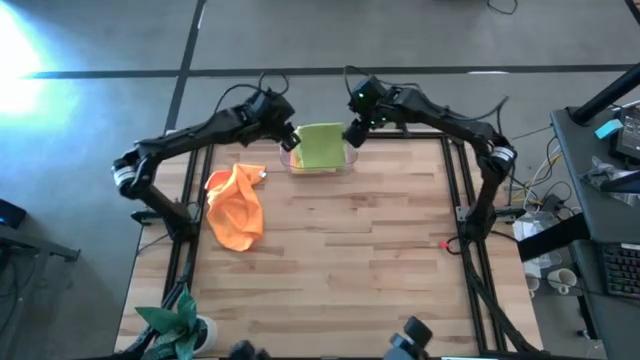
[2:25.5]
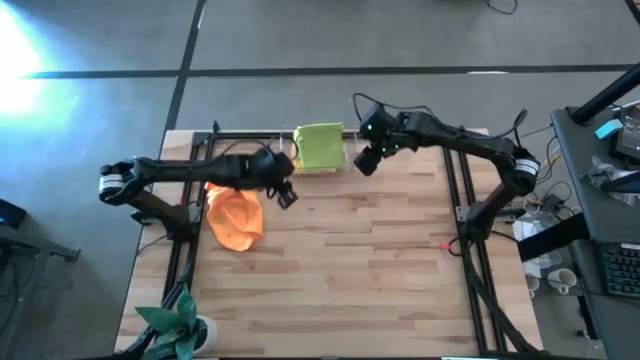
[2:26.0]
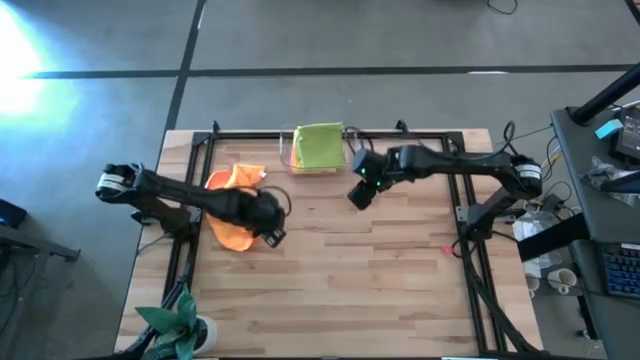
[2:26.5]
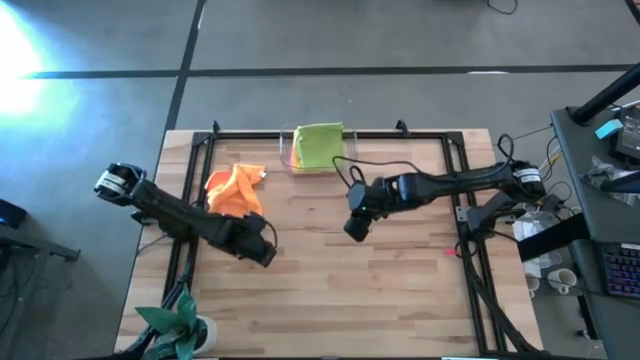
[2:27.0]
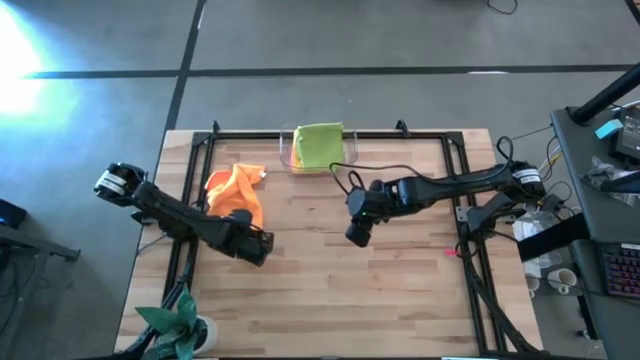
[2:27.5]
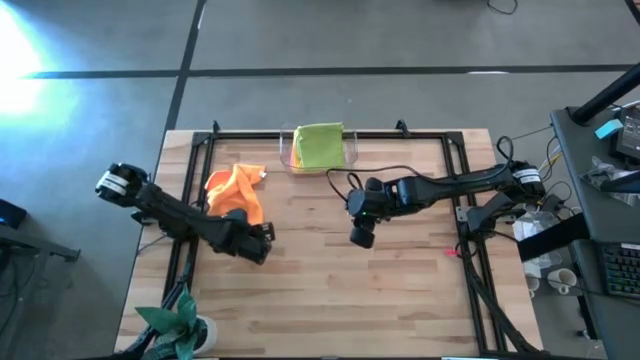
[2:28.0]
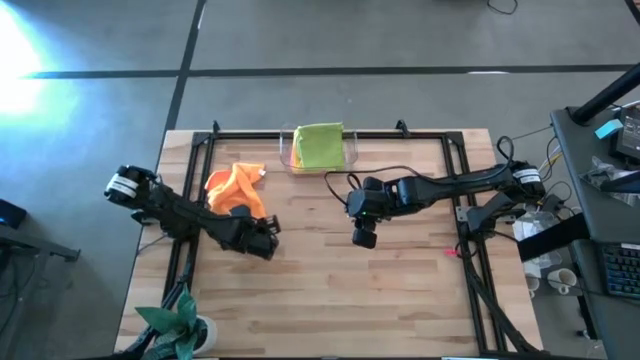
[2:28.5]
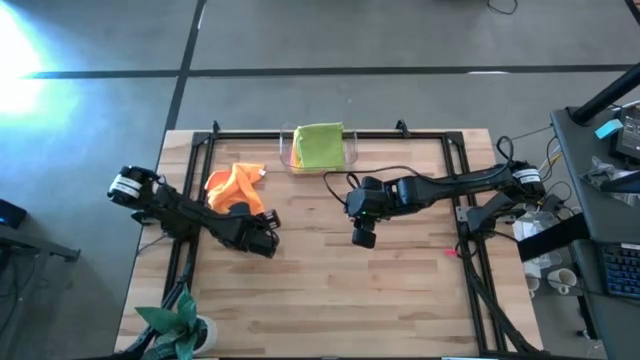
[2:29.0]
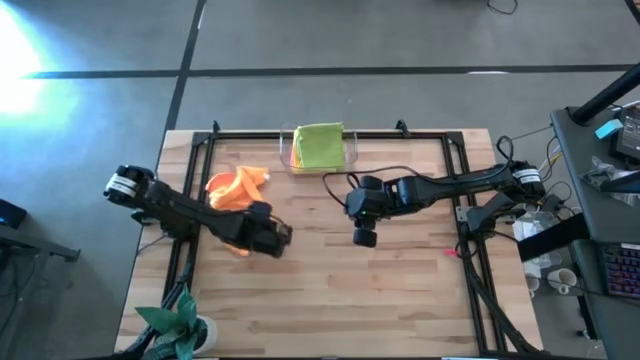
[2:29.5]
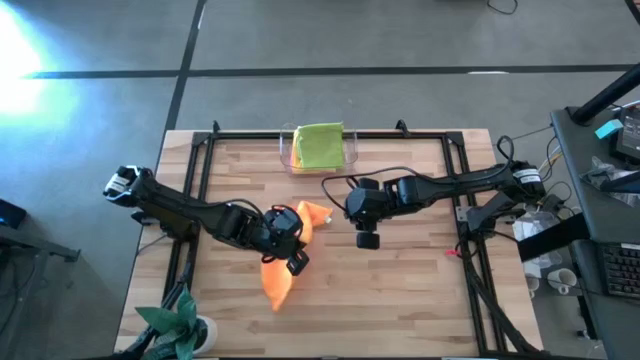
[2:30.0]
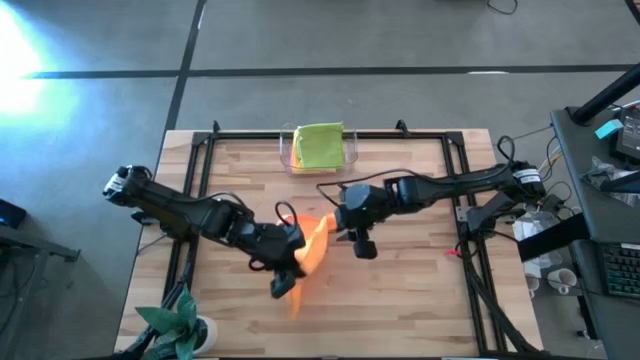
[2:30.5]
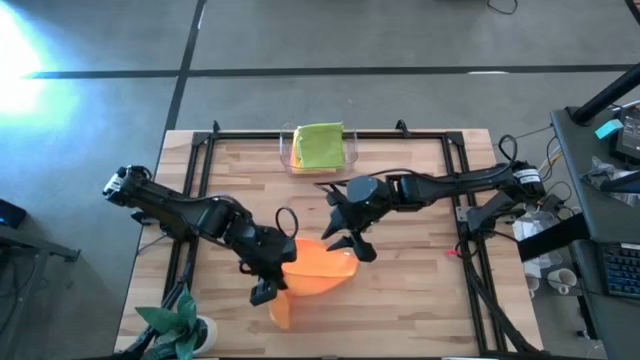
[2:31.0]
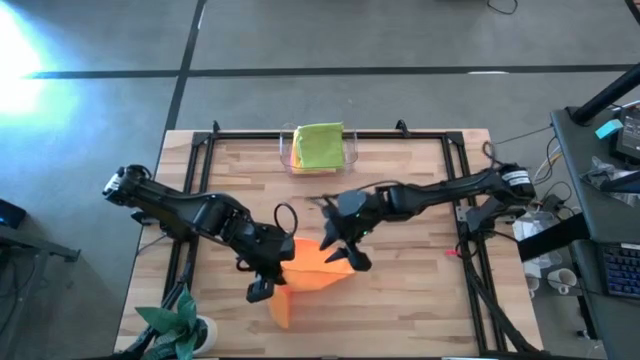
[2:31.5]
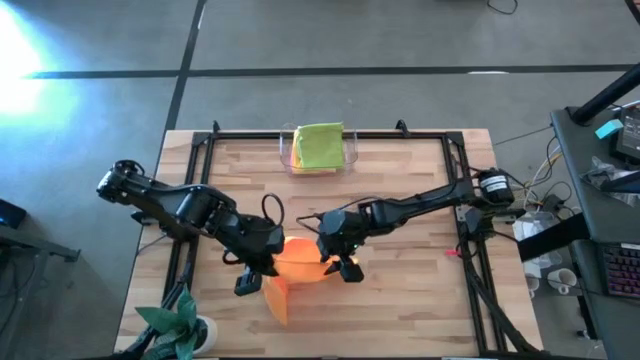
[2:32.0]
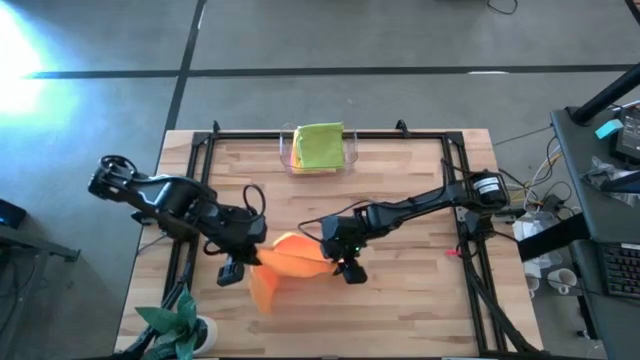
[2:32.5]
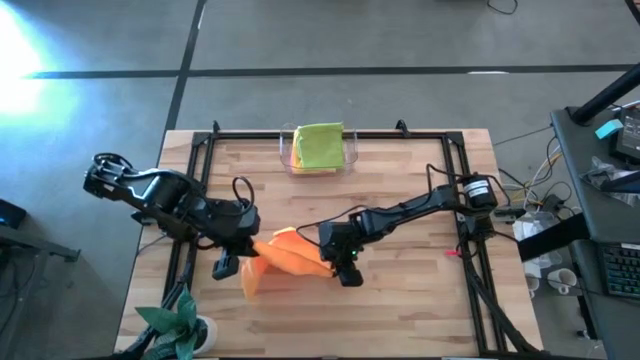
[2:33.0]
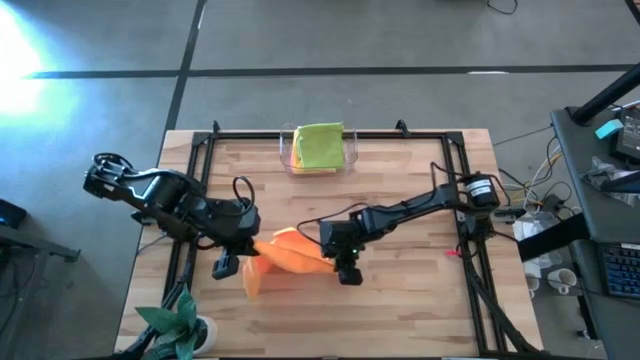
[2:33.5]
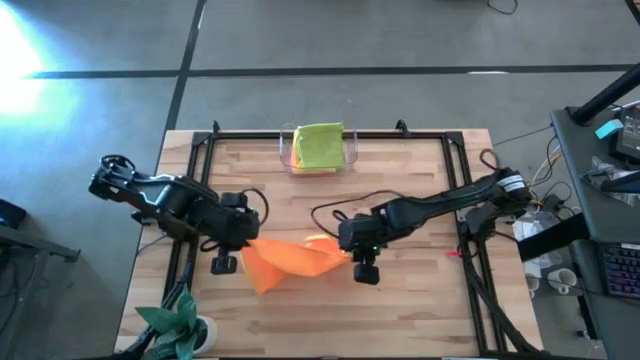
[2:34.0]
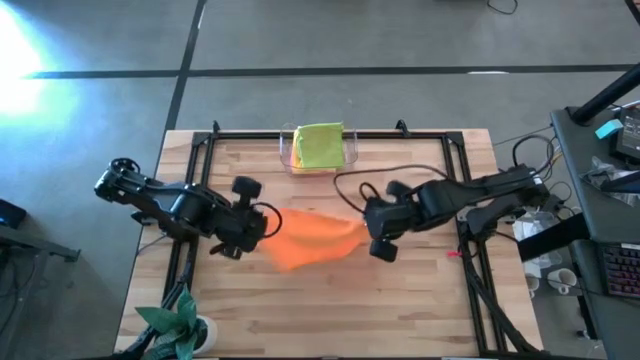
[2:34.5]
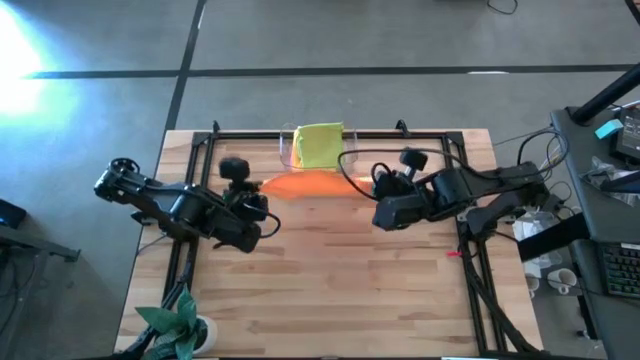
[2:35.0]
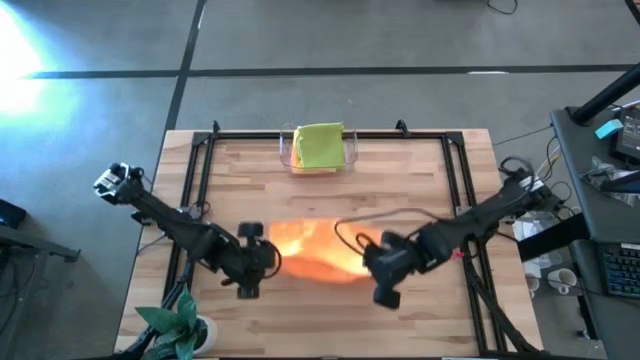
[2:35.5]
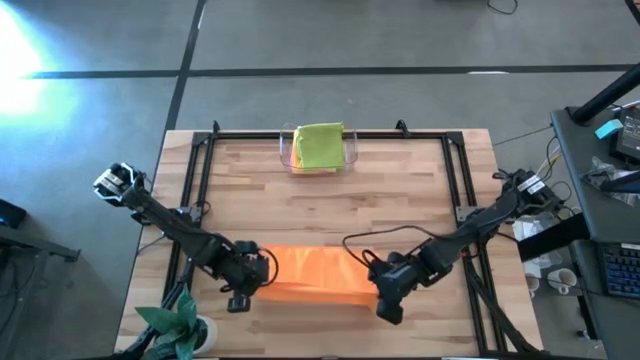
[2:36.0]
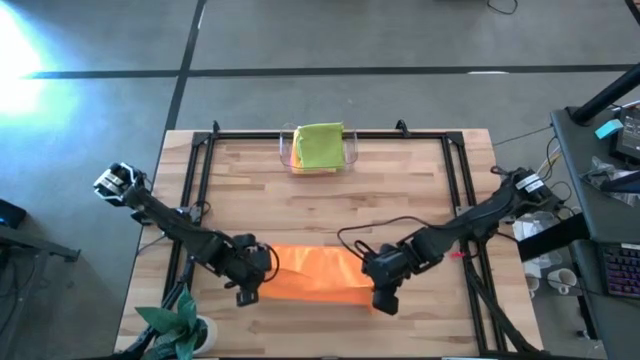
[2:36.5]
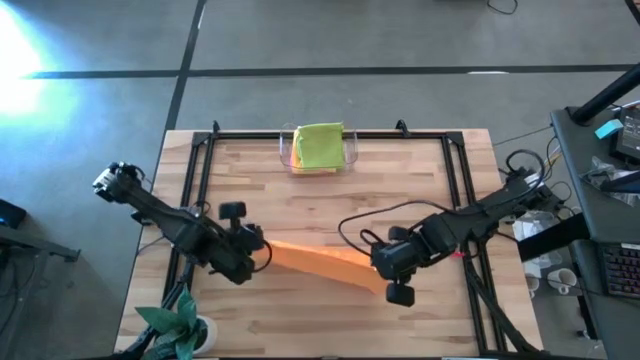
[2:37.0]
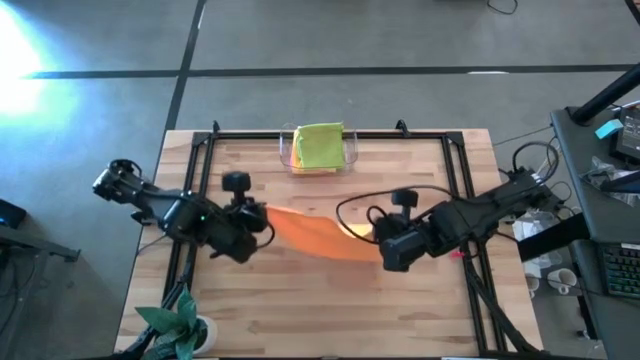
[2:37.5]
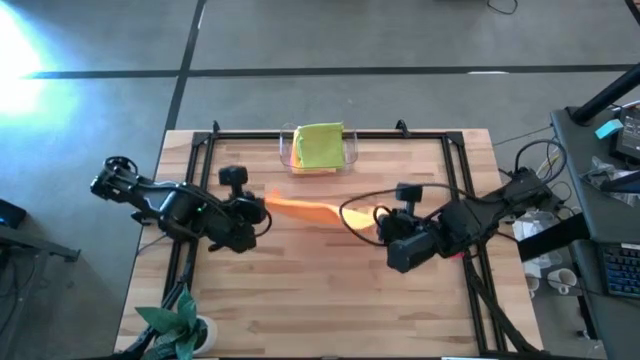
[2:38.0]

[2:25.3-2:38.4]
Task: Fold microfiber towels
Fold the orange microfiber cloth

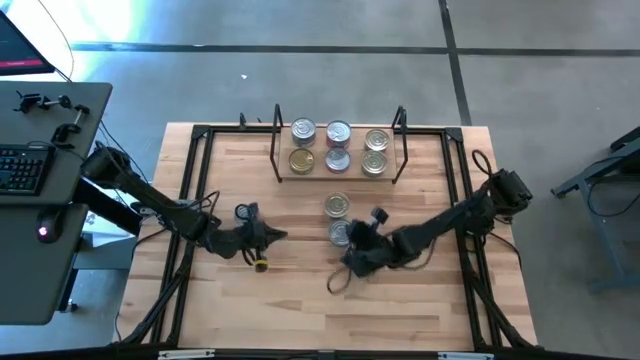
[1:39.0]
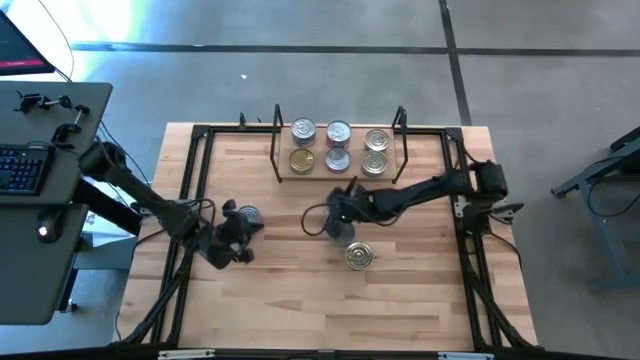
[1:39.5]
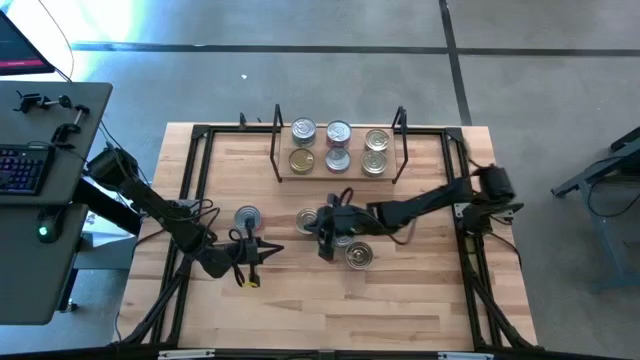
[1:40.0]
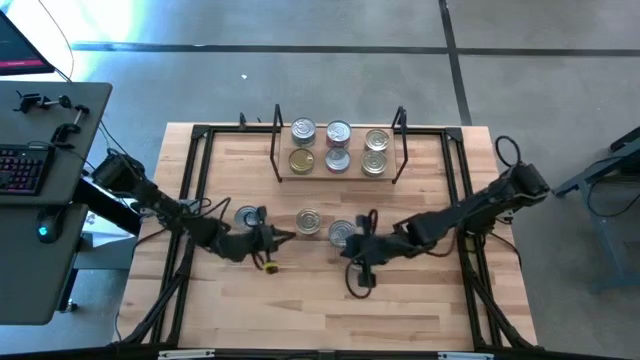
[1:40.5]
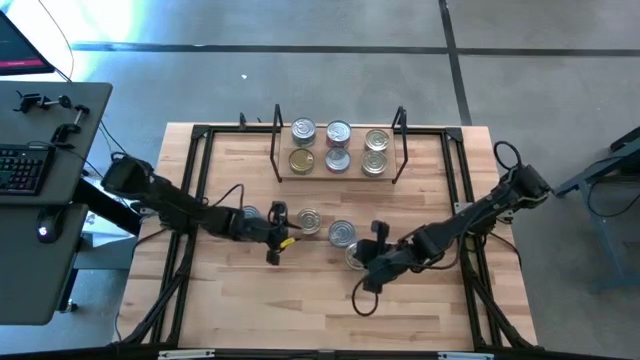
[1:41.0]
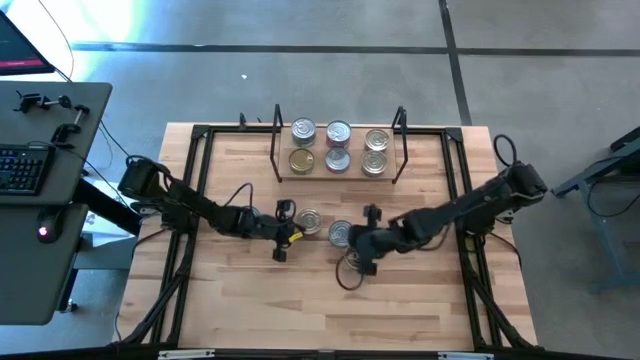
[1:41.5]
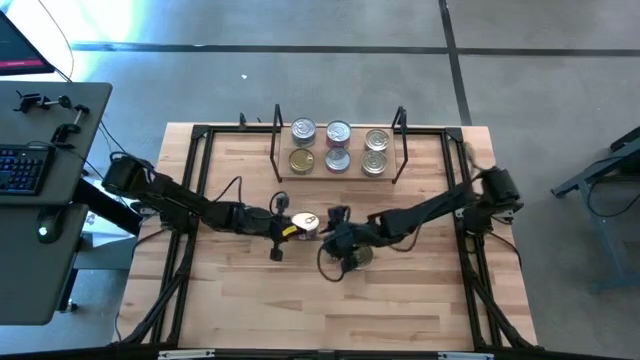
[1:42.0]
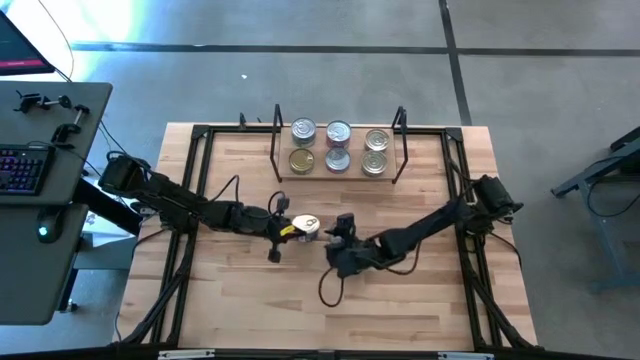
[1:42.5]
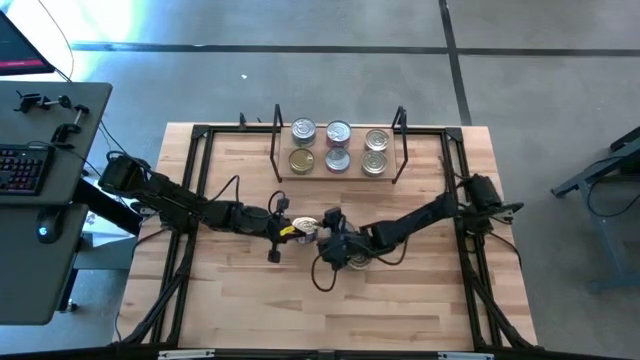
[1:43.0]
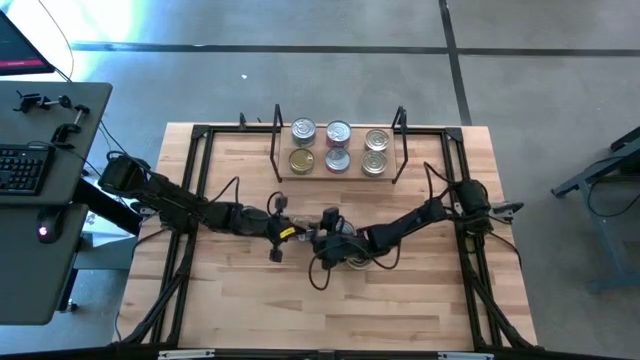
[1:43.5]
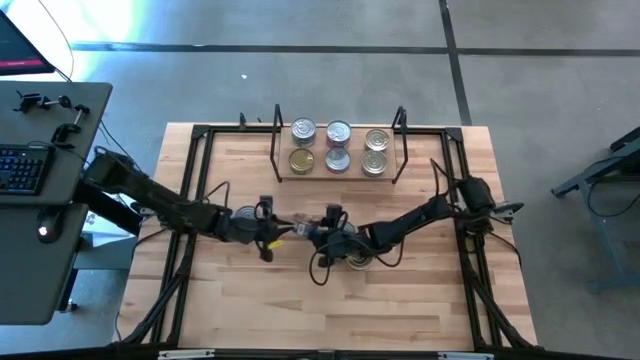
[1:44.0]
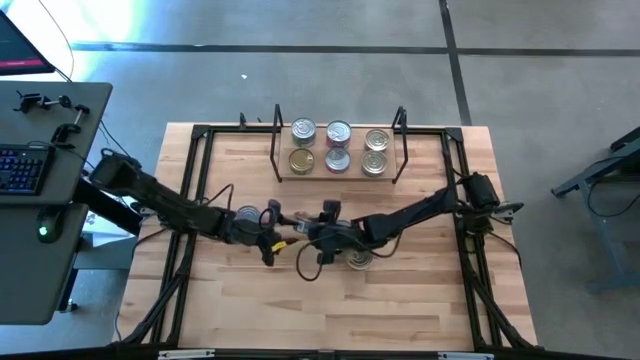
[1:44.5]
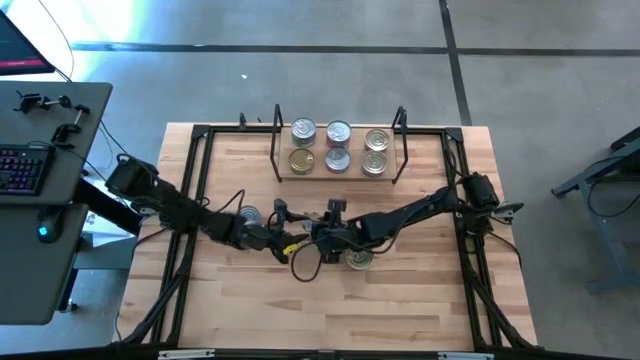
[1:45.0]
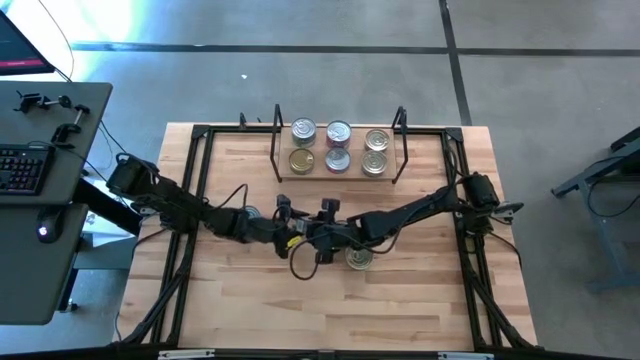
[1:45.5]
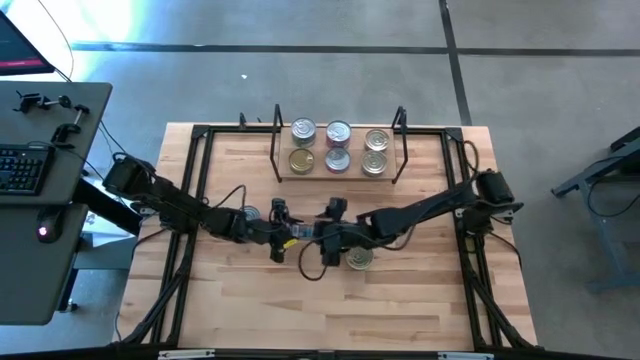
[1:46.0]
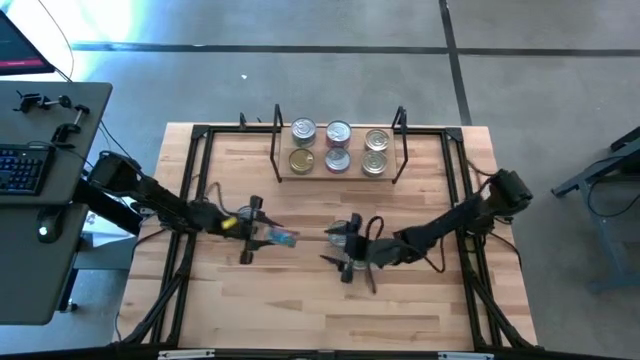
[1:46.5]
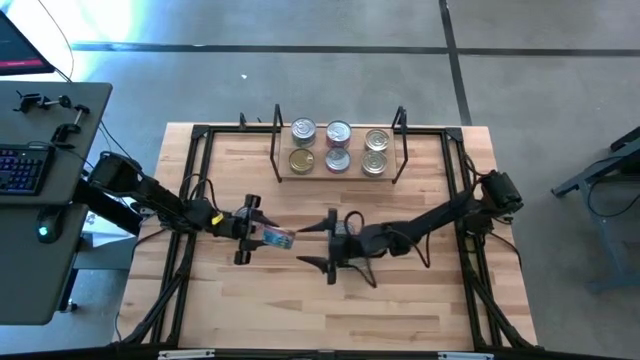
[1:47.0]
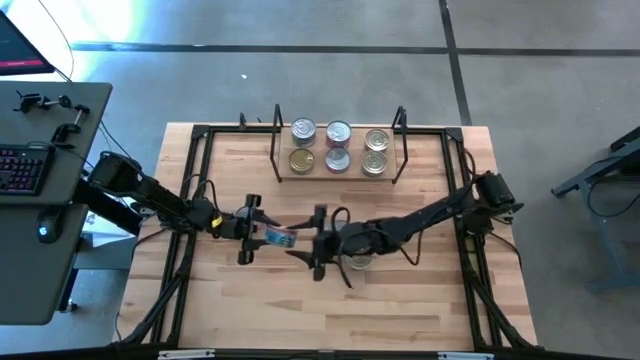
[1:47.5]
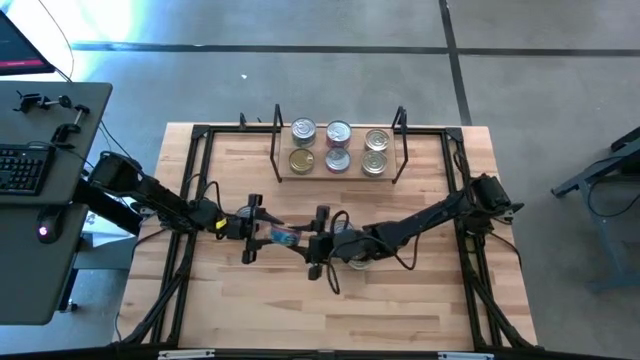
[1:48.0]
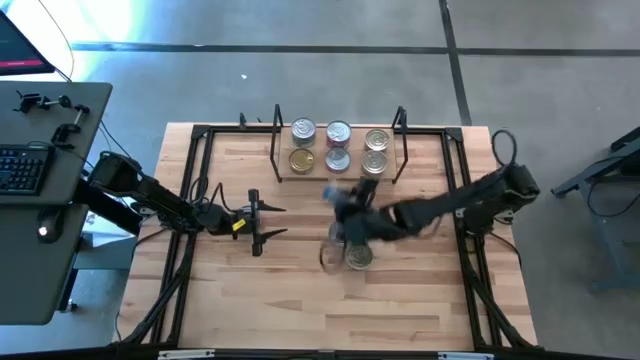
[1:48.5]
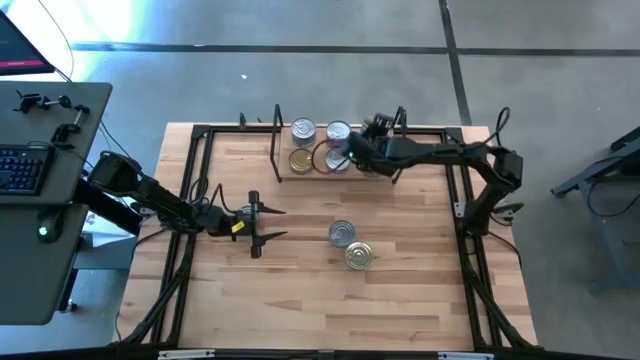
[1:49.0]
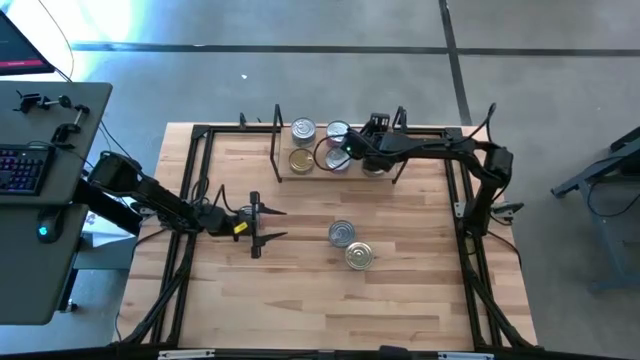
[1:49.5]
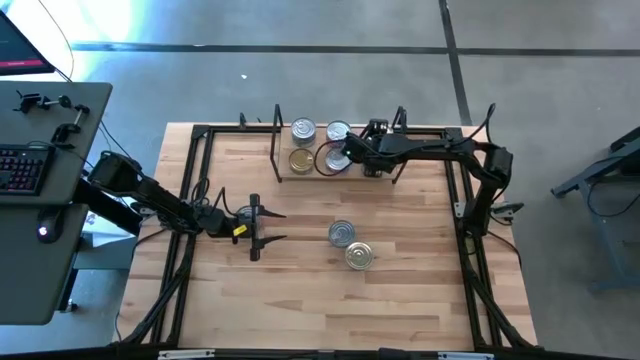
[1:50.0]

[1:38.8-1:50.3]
Task: Stack canned seafood by type on shelf
Stack the blue-pink tuna can on top of the blue tuna can on the shelf
